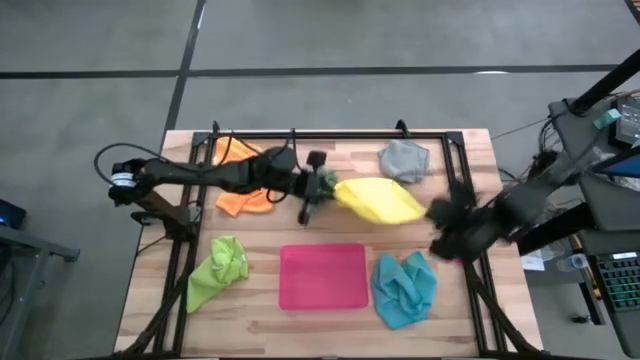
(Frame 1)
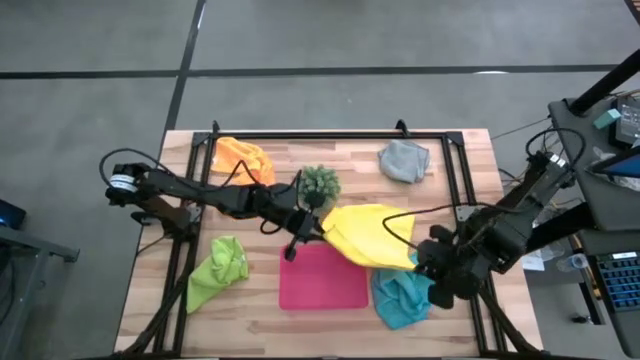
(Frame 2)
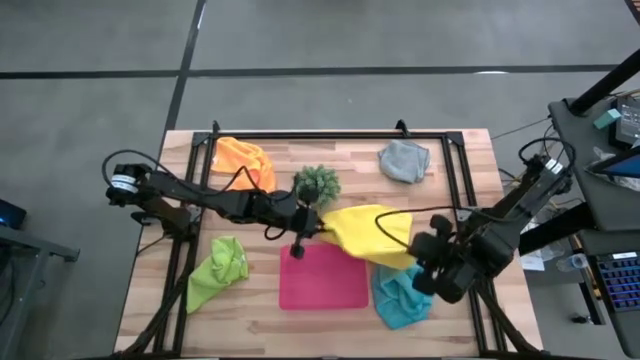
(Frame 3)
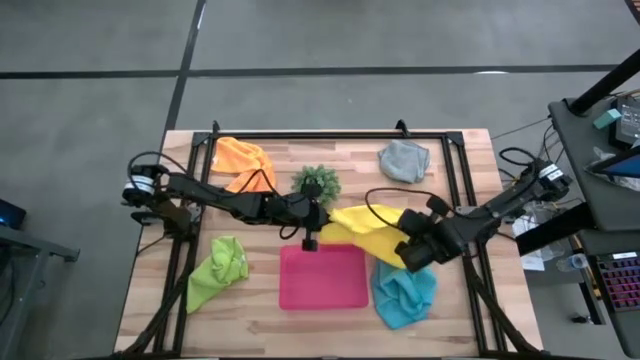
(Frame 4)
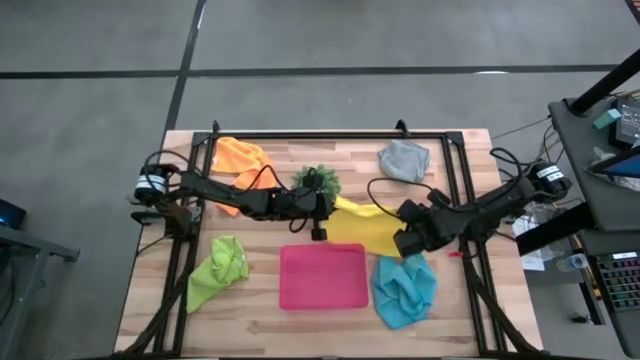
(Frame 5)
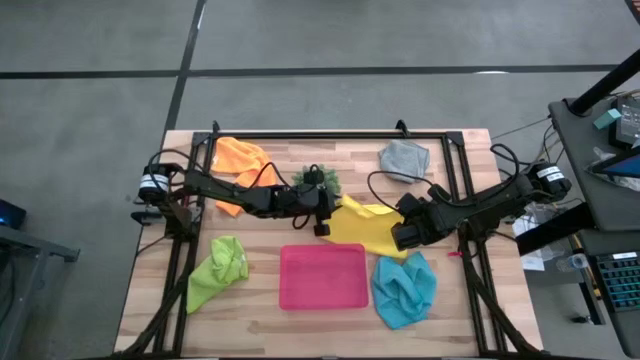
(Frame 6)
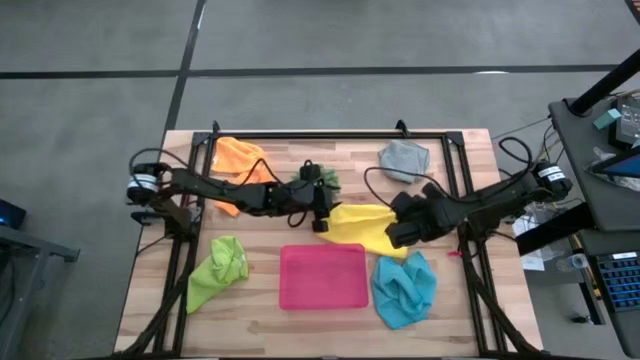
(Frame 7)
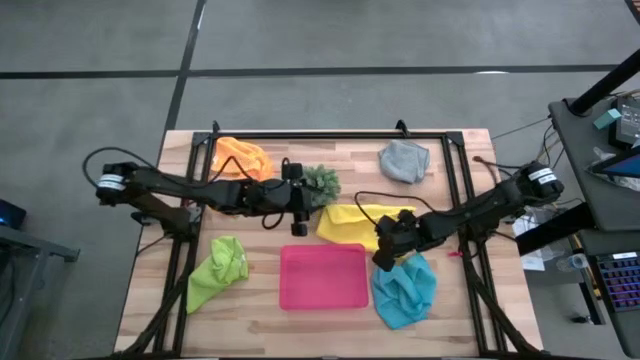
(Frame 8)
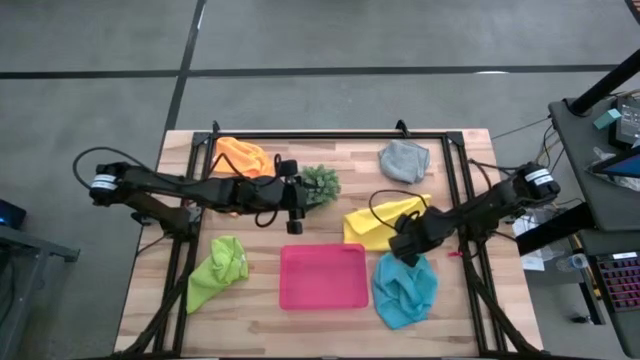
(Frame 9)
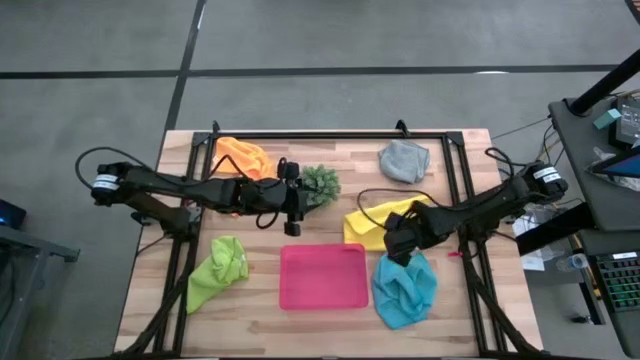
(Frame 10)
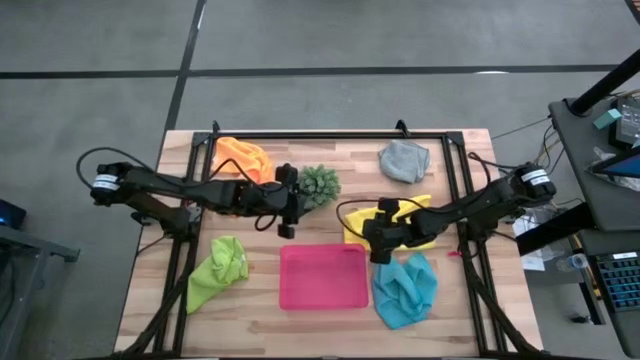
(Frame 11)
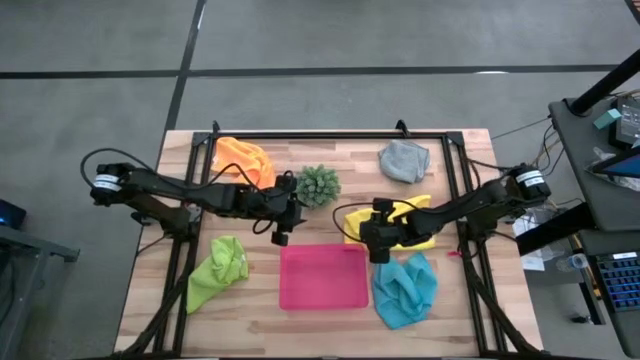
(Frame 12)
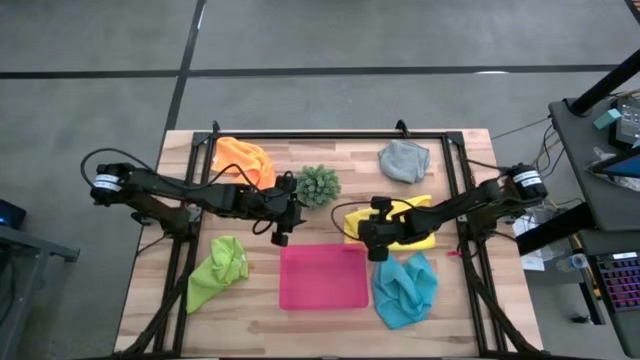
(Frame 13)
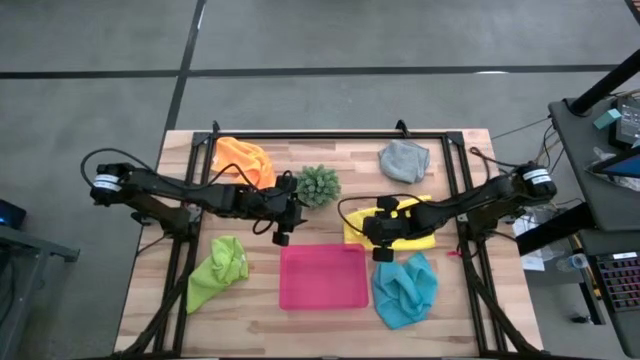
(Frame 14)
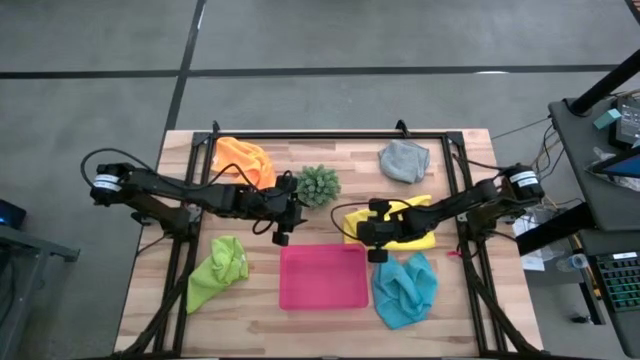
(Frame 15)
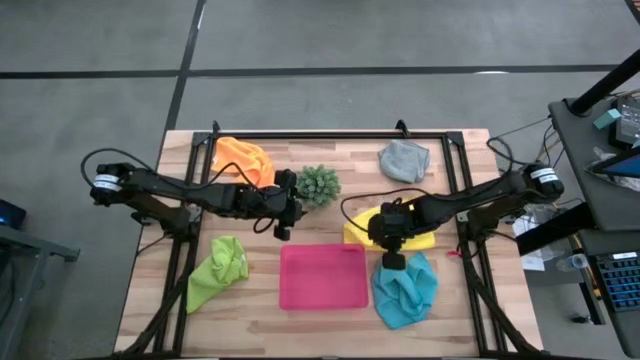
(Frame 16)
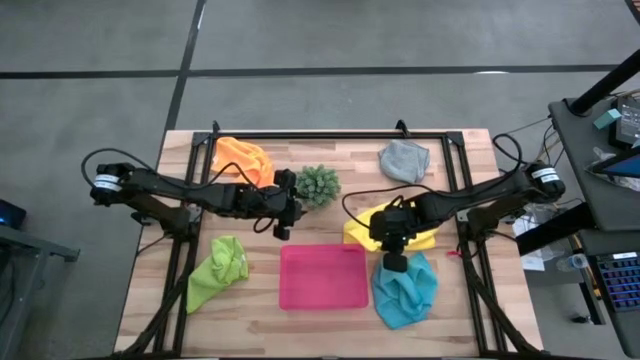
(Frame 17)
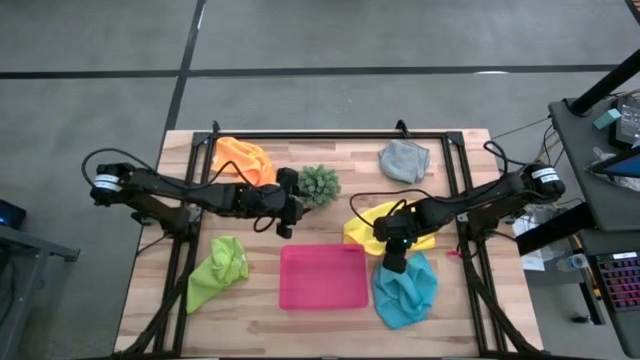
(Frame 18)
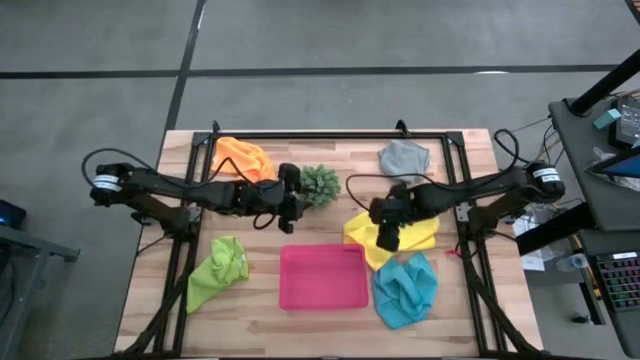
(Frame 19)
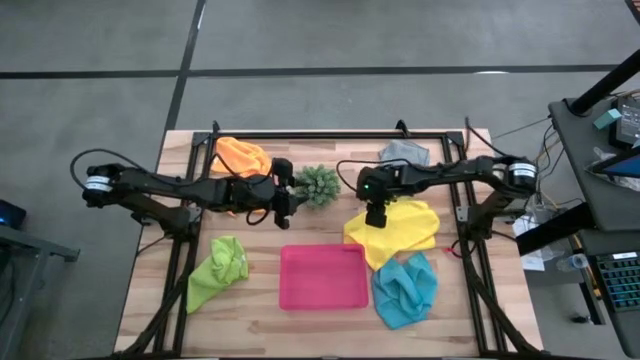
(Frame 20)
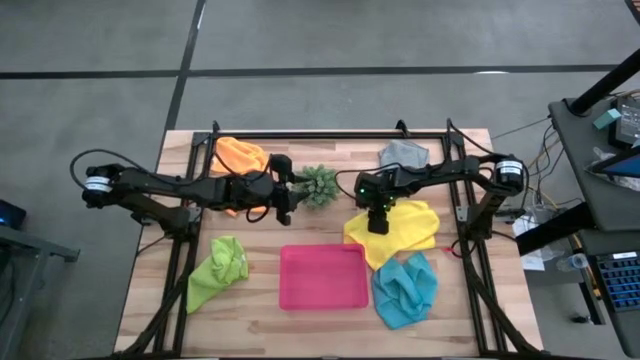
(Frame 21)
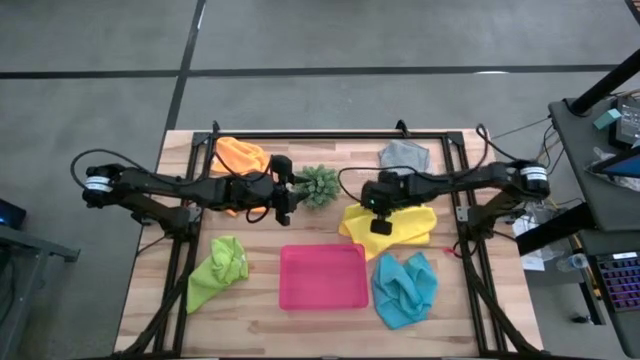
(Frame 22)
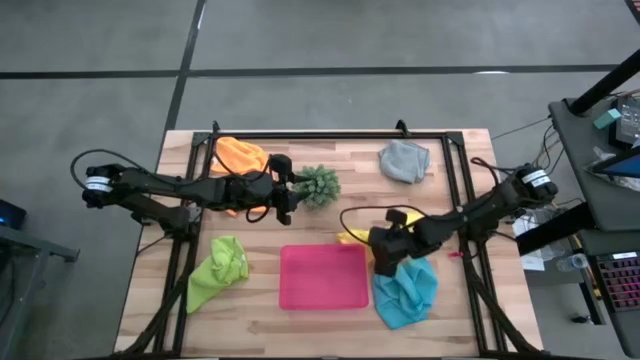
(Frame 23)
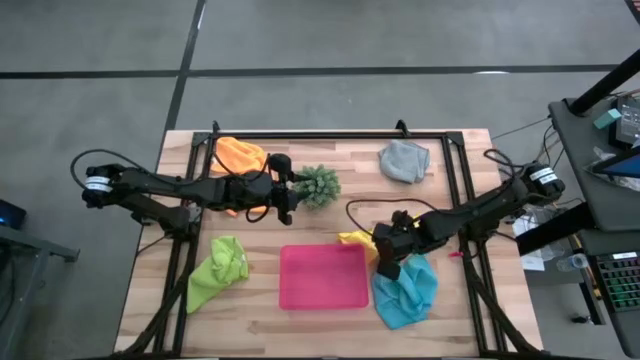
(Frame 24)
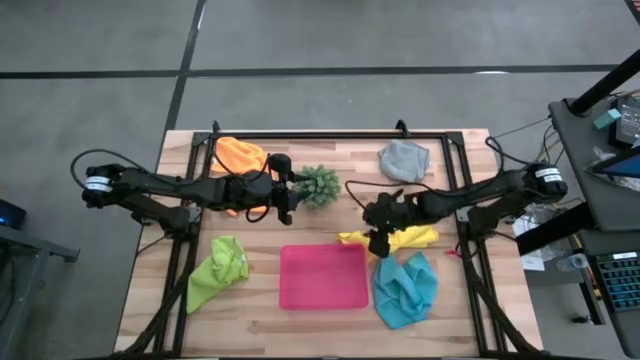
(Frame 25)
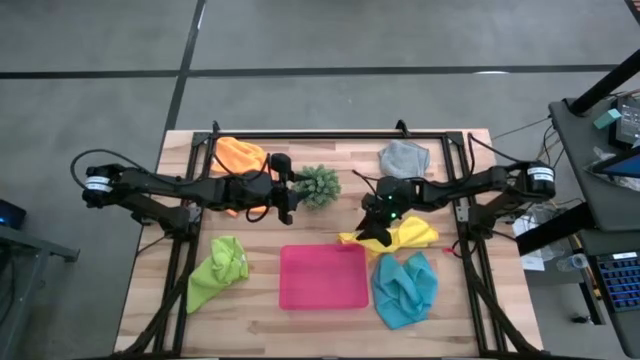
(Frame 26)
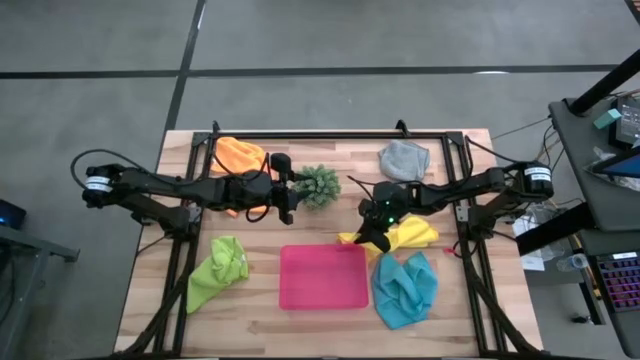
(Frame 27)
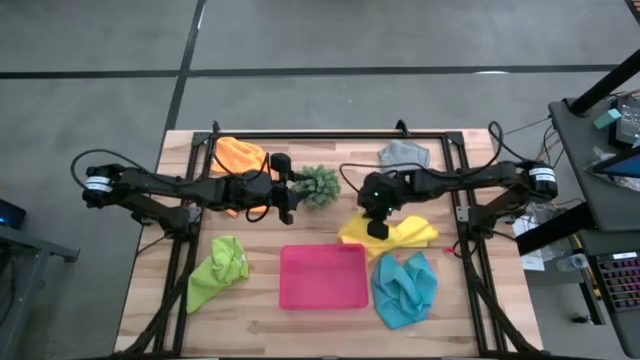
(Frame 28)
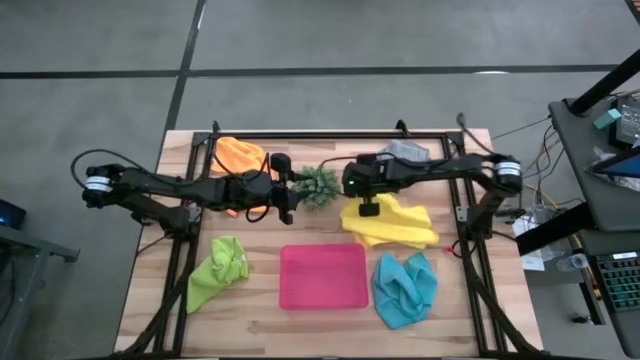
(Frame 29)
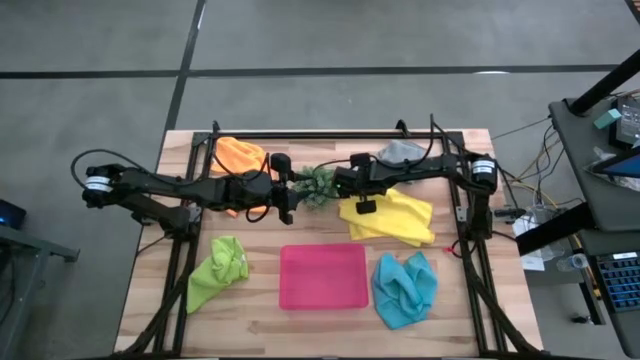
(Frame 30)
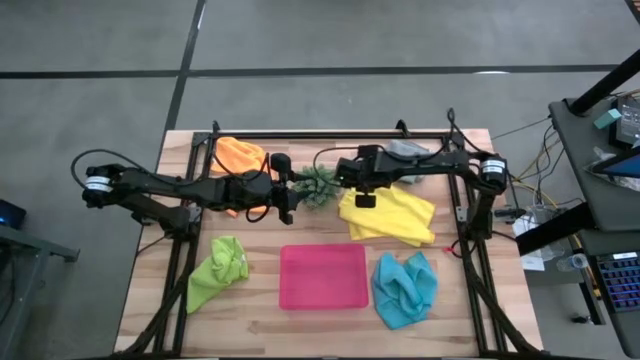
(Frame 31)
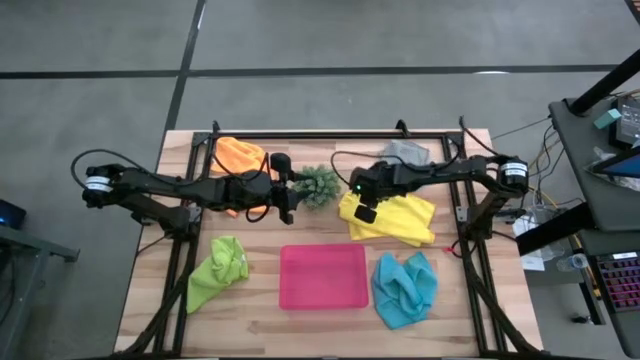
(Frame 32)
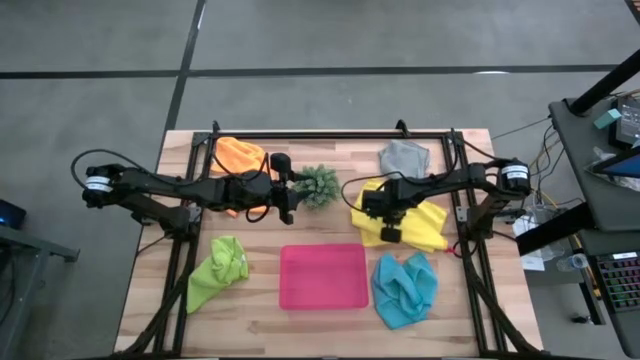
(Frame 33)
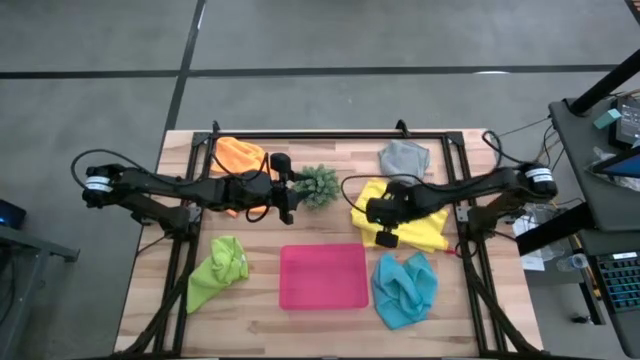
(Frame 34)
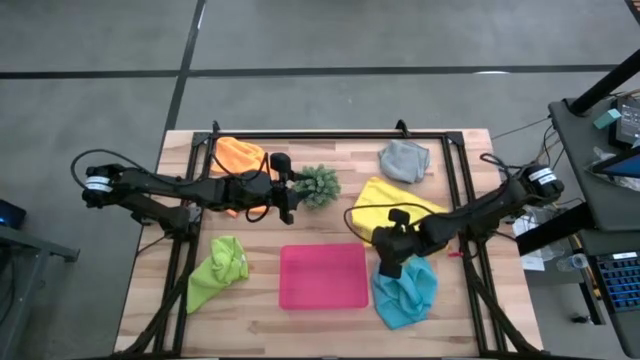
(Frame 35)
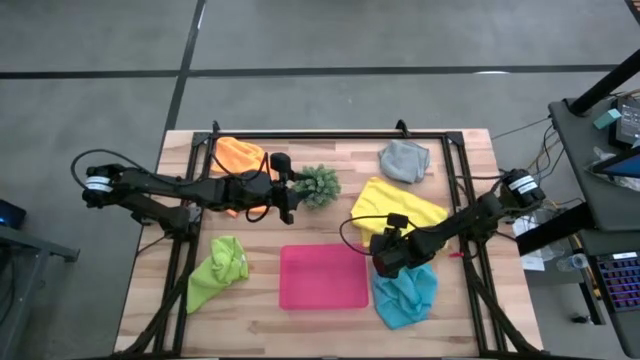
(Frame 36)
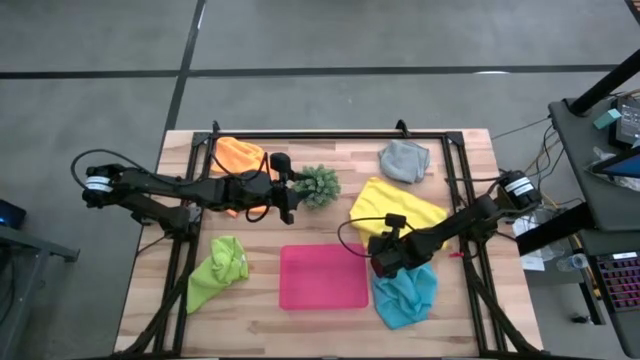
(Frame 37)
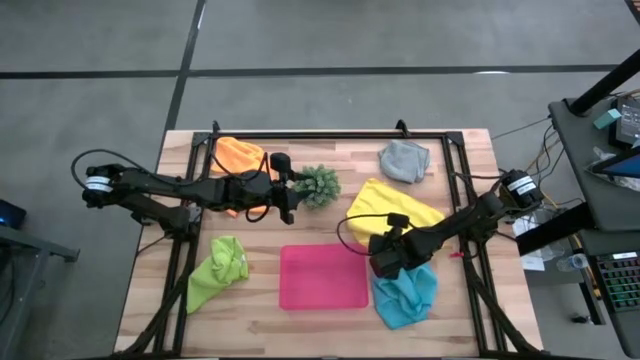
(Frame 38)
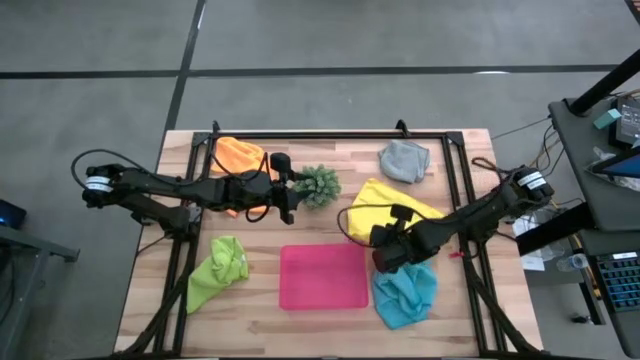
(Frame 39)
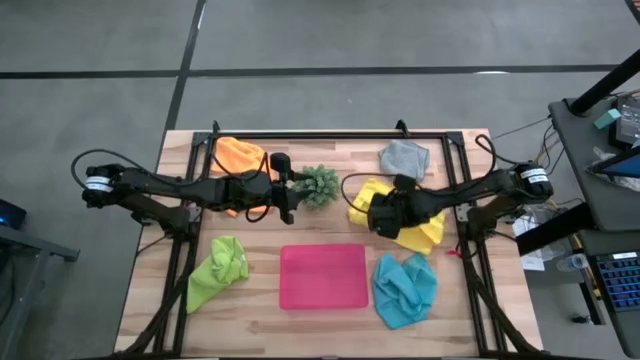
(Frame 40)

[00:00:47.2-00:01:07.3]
Task: Fold microfiber towels
Fold the yellow microfiber cloth
